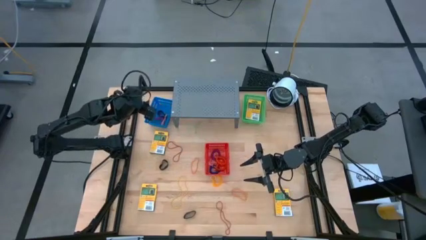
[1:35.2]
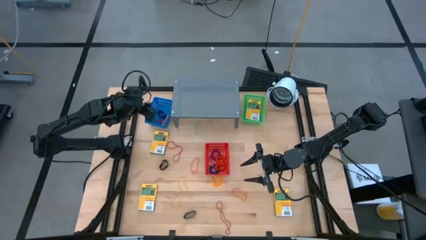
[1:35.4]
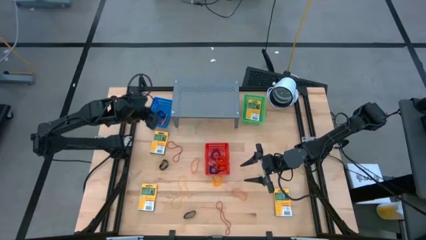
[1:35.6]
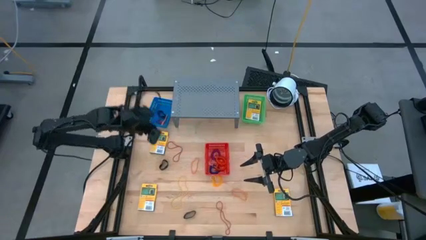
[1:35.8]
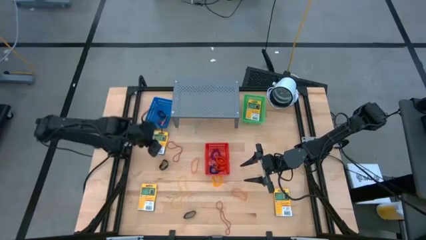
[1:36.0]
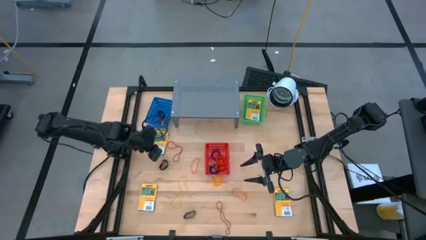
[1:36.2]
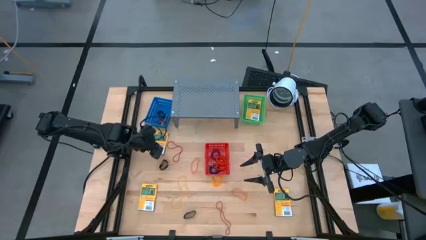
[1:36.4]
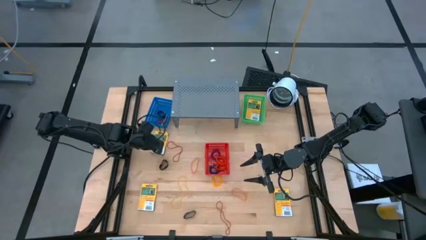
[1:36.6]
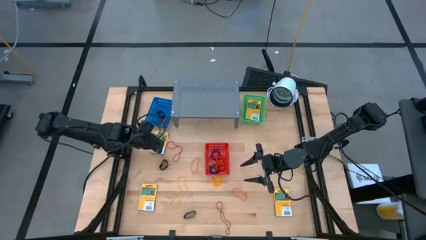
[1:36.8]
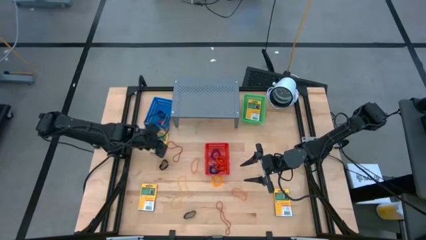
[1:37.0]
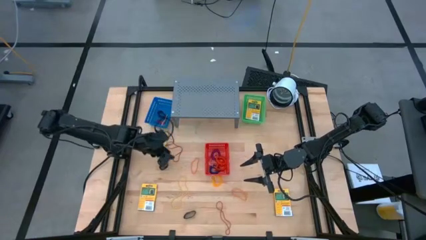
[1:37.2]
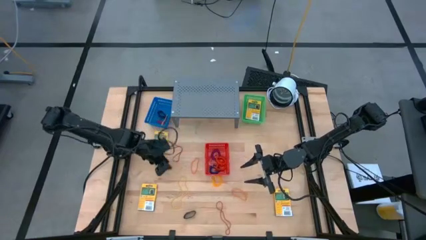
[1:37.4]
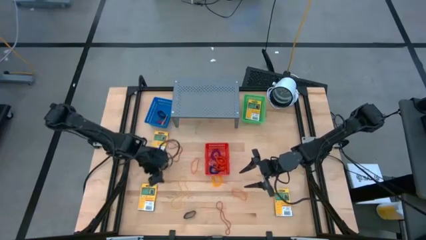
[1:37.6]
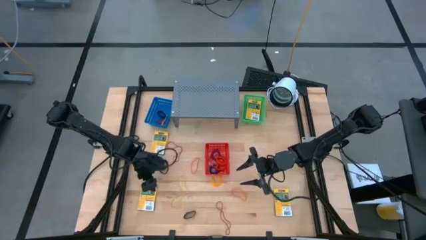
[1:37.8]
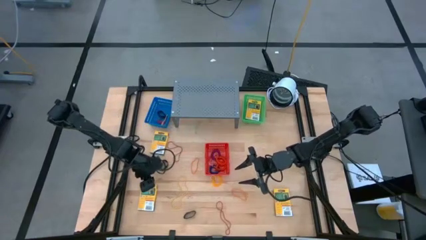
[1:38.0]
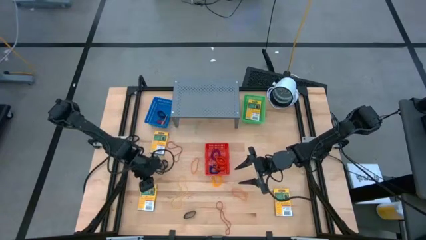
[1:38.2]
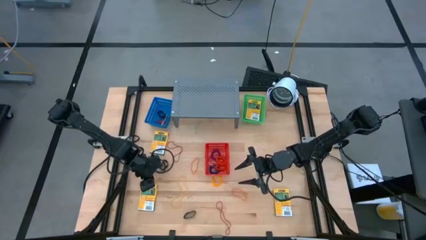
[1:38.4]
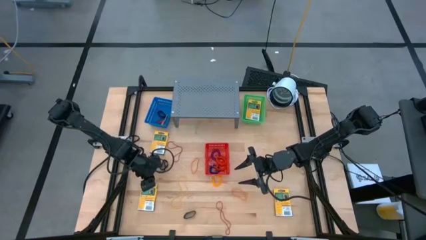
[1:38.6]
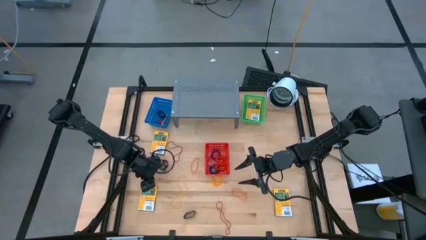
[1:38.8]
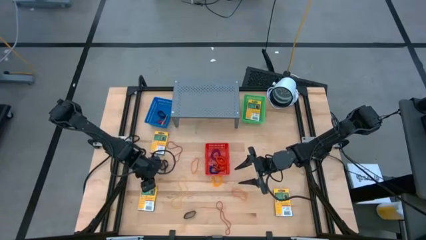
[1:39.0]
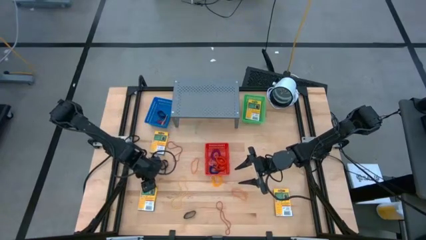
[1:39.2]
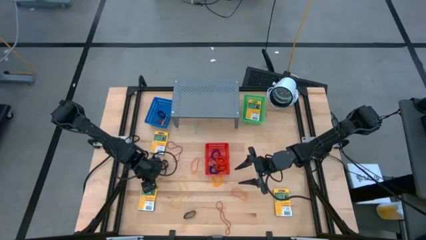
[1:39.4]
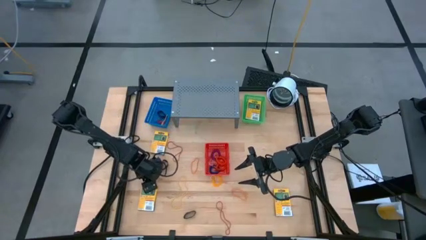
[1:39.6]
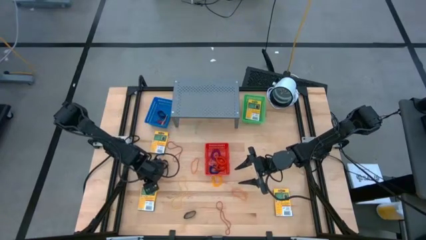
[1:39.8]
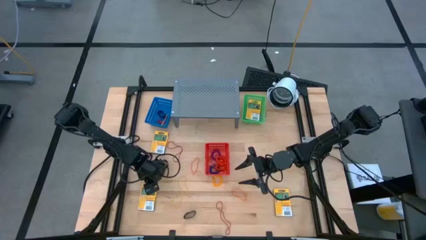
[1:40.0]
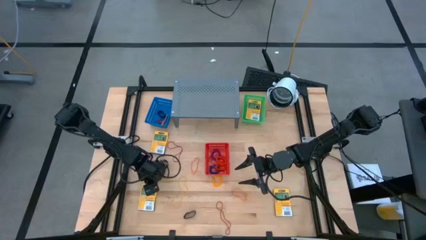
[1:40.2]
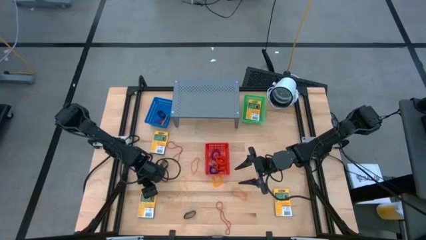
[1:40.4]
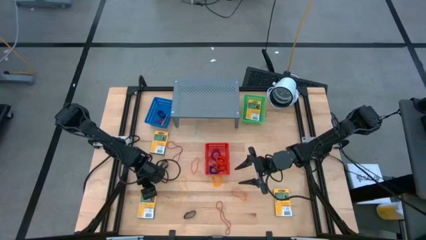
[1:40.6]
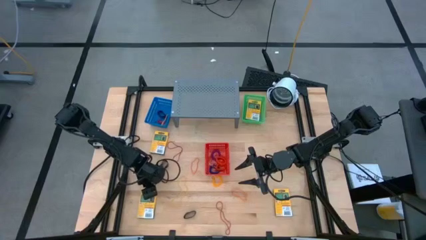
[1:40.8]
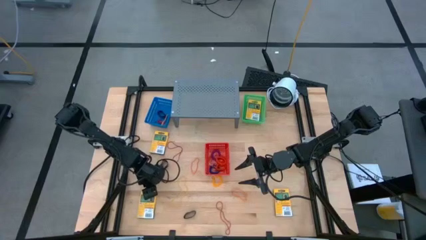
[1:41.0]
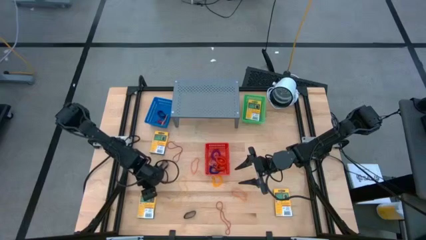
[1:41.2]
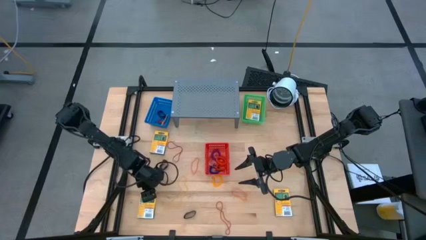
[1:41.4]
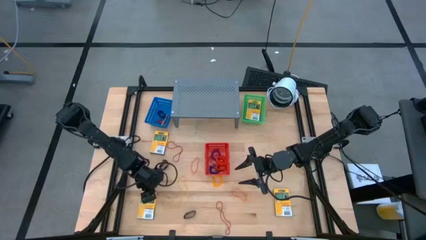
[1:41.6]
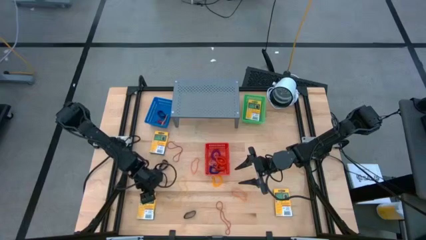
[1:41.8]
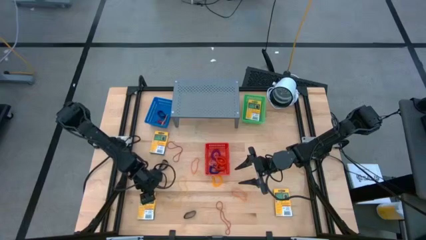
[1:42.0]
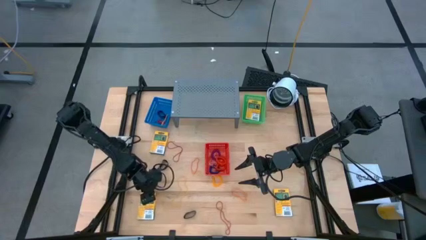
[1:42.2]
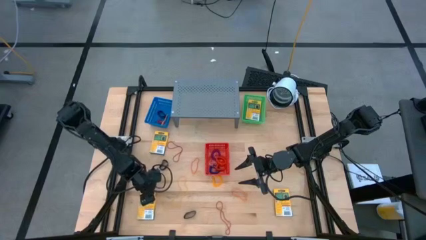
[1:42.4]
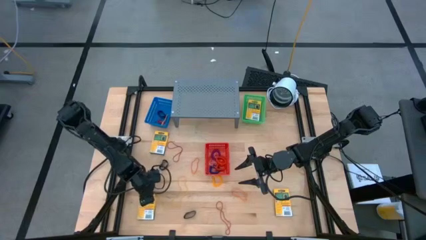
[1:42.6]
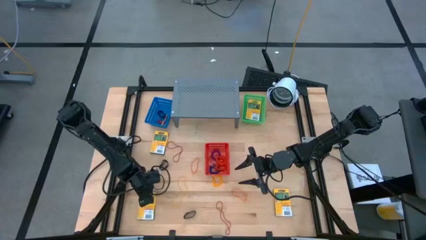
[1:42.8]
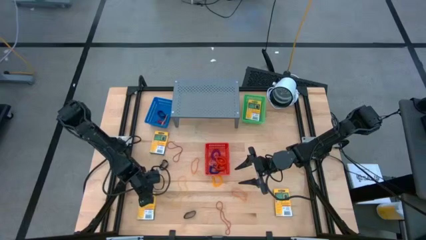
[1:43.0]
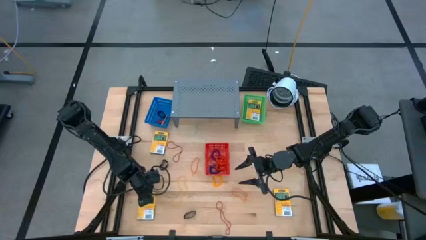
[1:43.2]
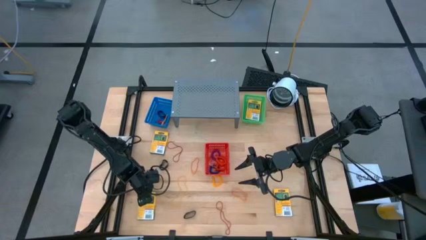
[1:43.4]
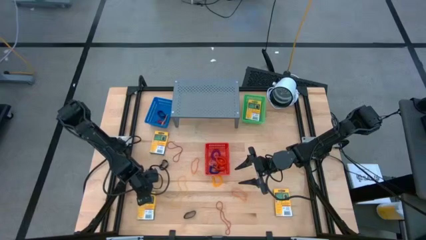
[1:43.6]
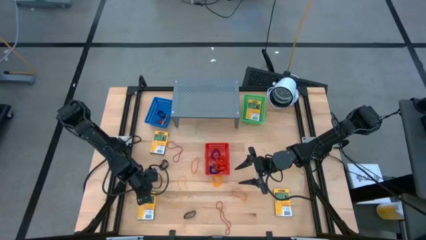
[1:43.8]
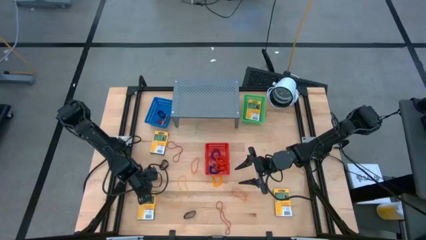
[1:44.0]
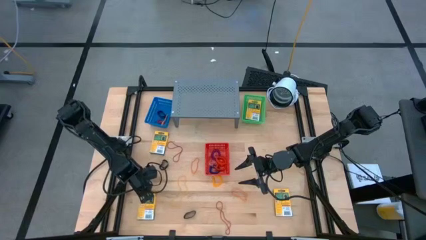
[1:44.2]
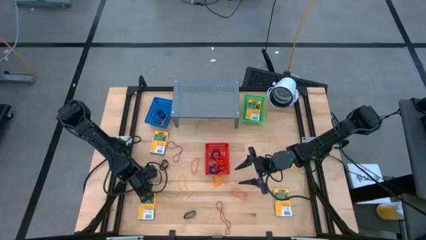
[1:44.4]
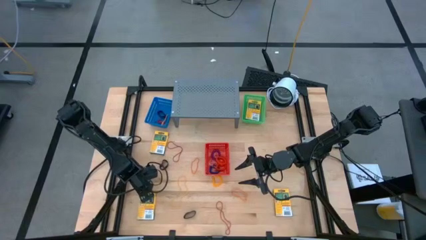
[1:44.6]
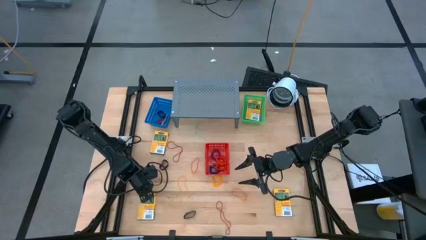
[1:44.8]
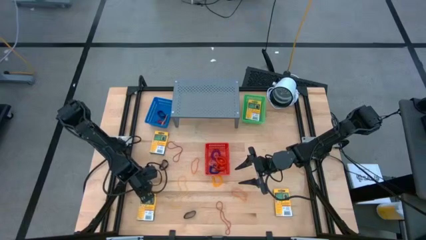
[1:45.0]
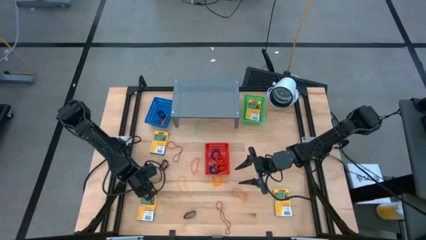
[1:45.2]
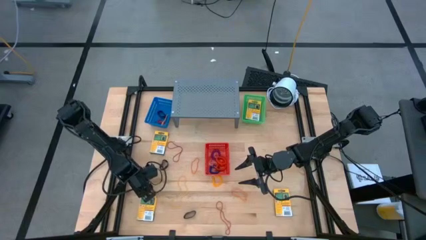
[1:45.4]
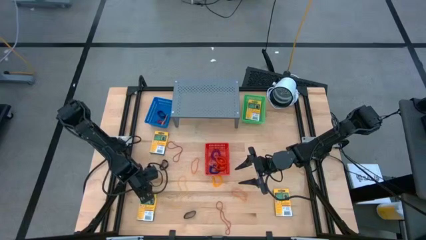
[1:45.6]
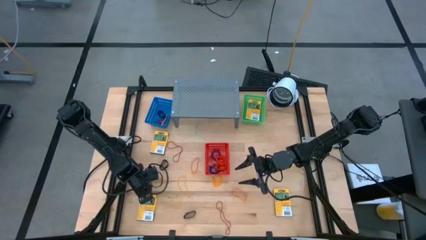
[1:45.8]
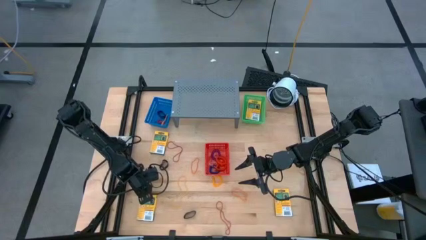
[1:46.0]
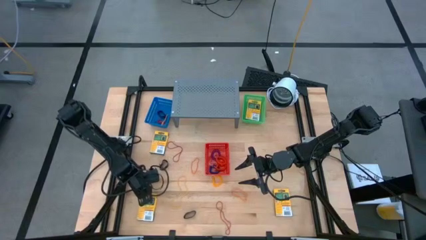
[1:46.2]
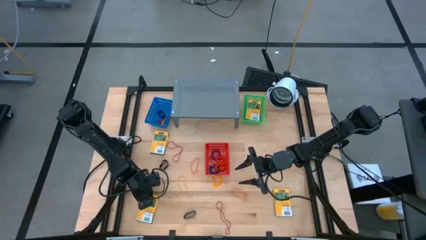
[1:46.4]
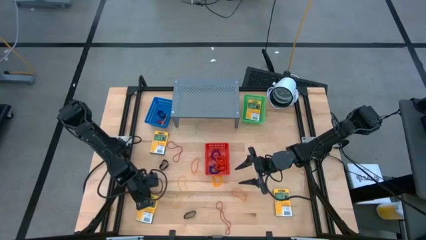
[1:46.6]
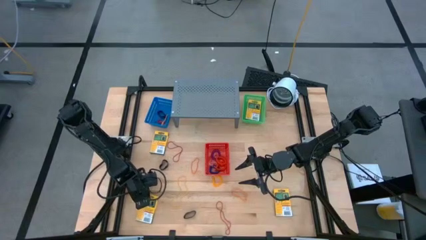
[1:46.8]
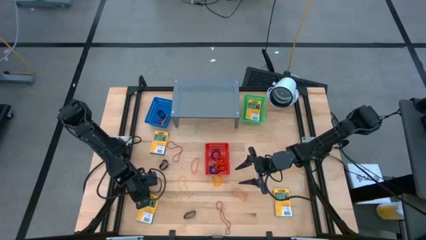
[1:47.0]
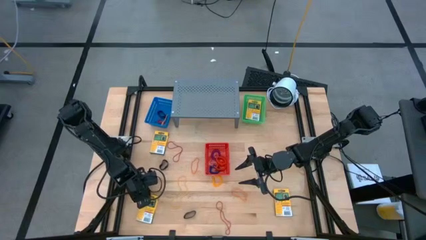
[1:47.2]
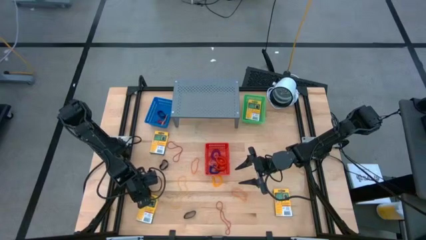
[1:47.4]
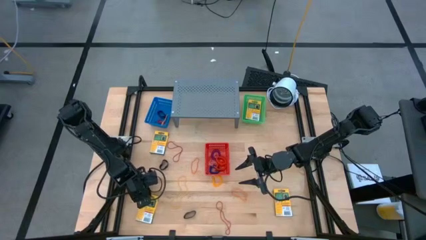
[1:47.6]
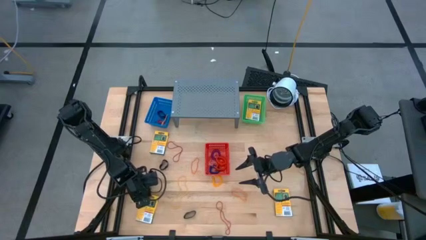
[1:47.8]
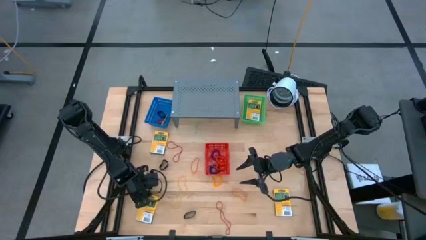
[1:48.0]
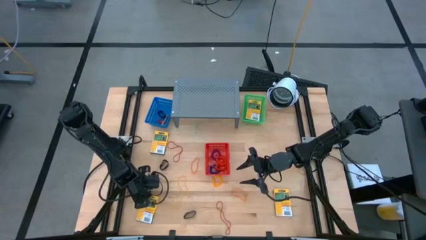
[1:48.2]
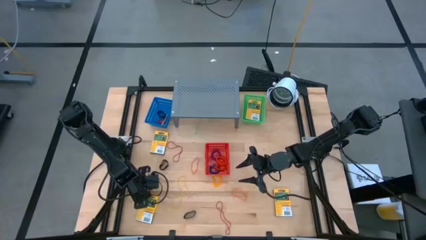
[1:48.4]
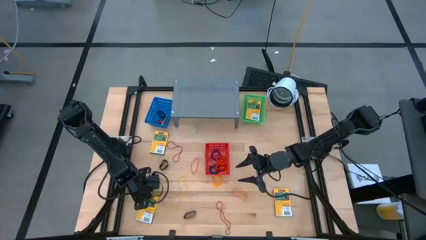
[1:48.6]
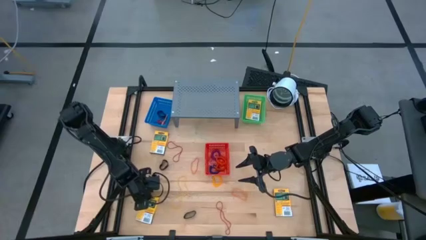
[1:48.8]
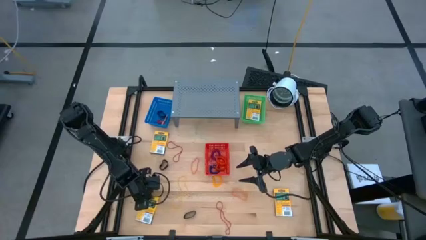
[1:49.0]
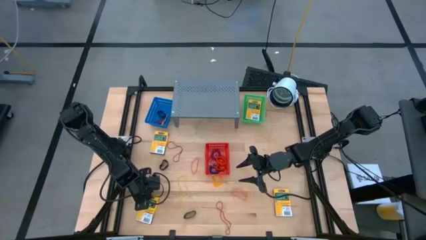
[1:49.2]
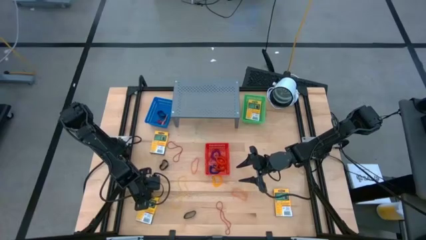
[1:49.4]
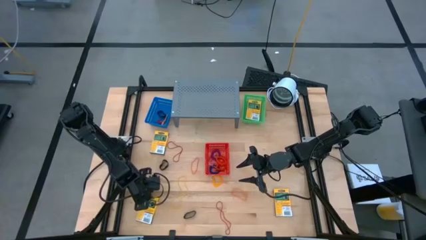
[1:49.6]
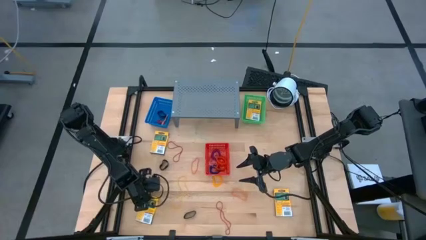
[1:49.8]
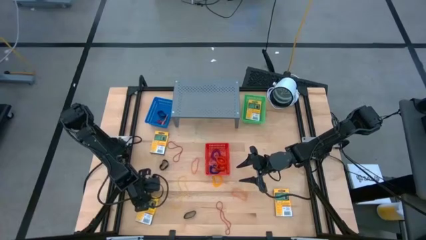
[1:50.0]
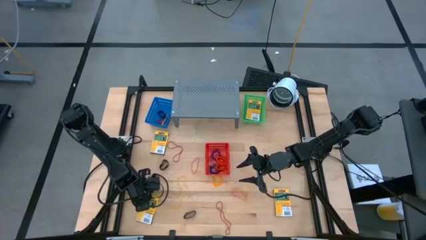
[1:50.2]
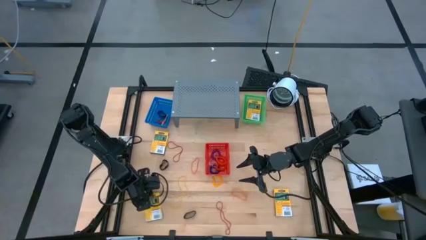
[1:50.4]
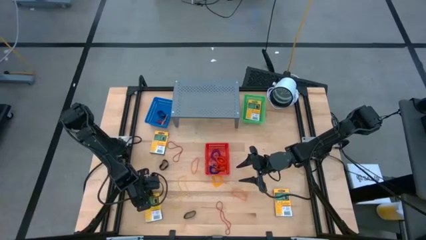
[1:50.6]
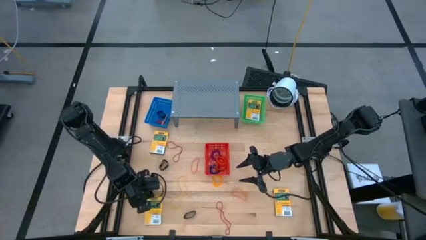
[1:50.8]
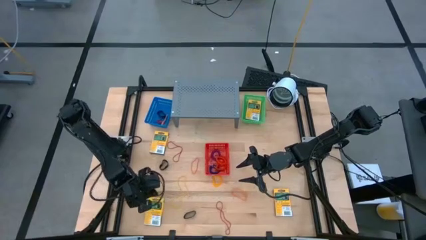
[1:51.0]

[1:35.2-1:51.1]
Task: Pick & Place Office Desk Supplies
Put the bottom left yellow crayon box into the green basket
